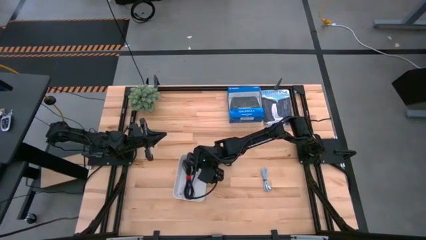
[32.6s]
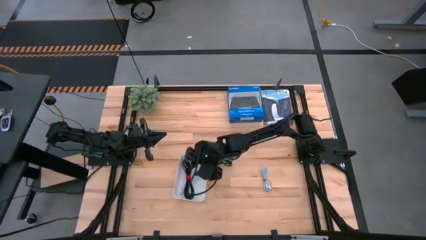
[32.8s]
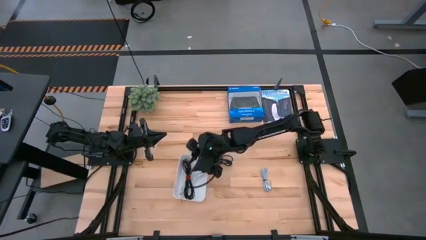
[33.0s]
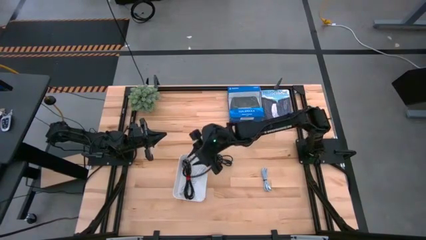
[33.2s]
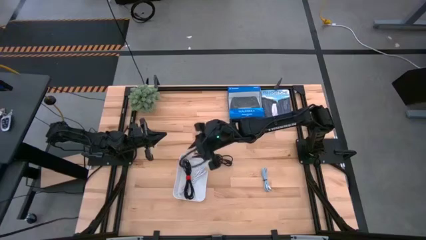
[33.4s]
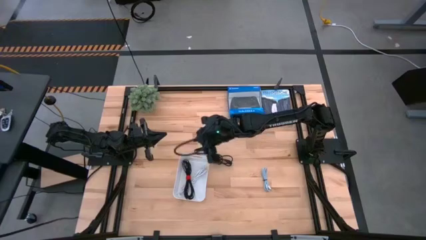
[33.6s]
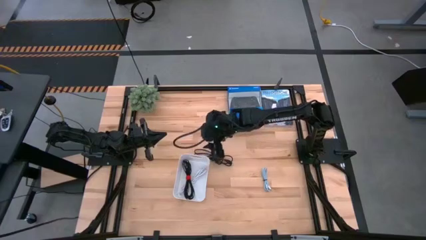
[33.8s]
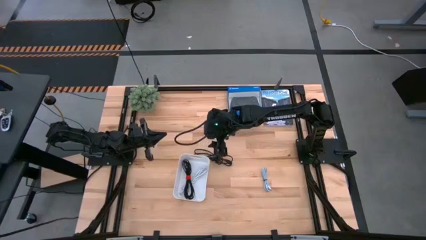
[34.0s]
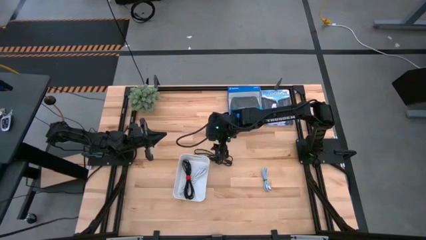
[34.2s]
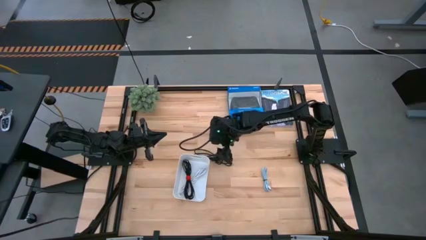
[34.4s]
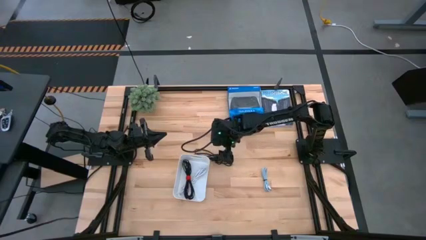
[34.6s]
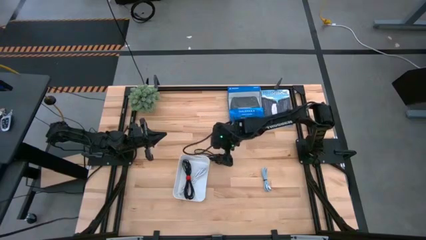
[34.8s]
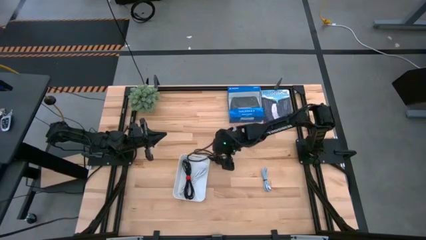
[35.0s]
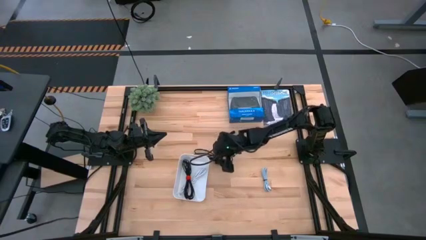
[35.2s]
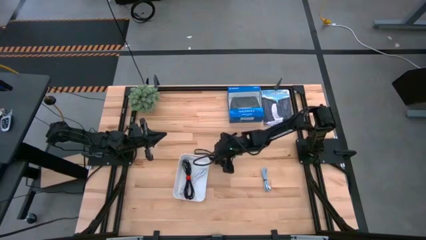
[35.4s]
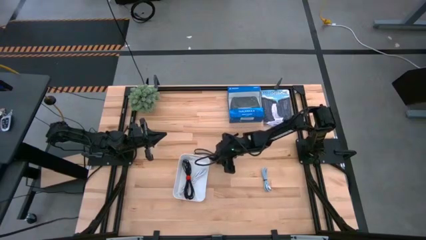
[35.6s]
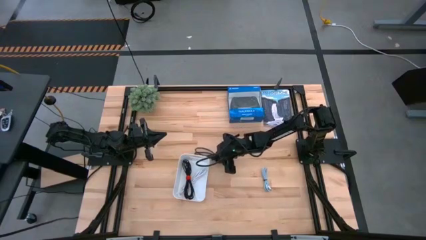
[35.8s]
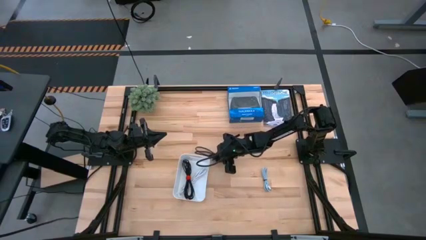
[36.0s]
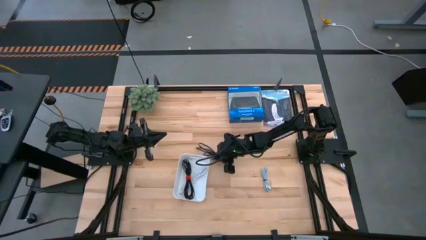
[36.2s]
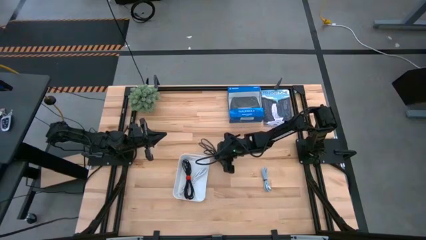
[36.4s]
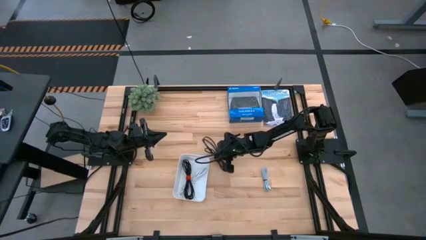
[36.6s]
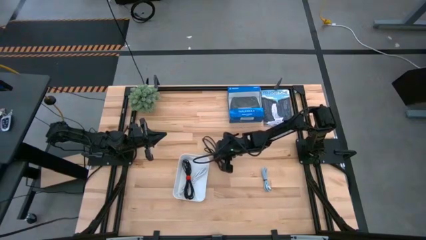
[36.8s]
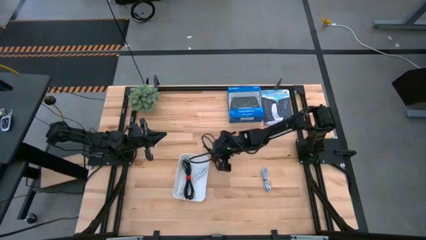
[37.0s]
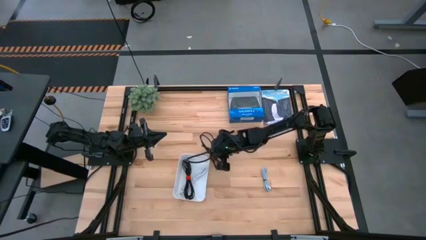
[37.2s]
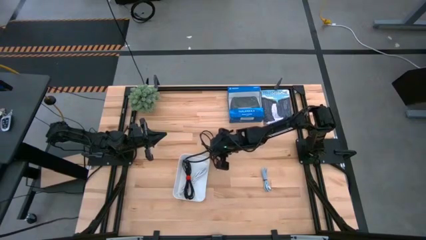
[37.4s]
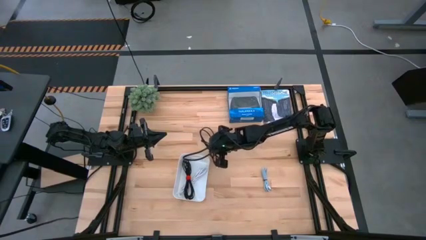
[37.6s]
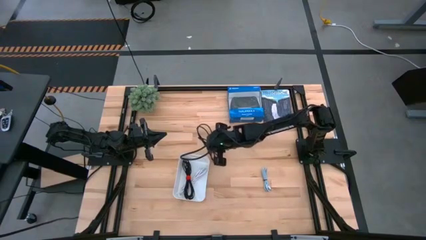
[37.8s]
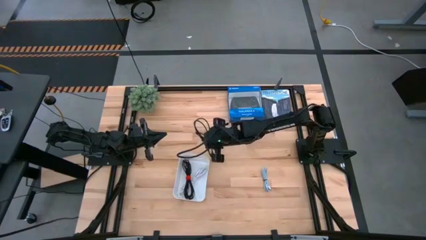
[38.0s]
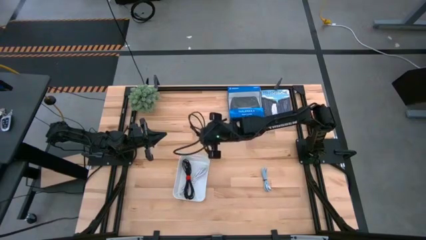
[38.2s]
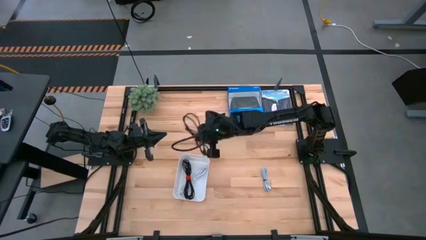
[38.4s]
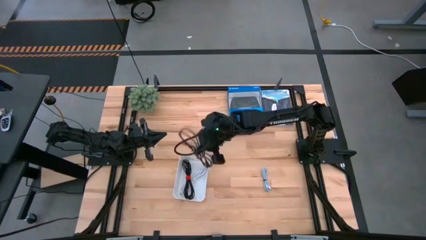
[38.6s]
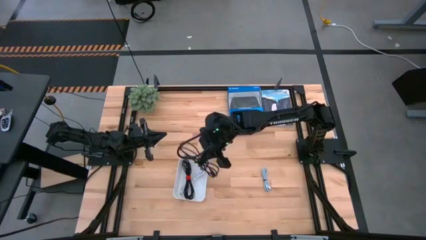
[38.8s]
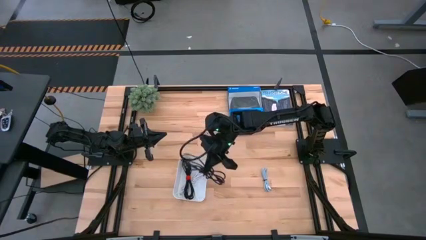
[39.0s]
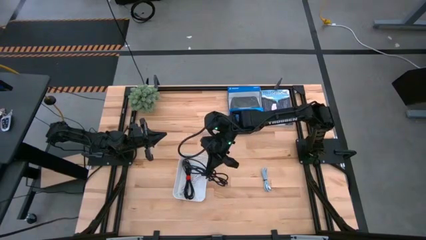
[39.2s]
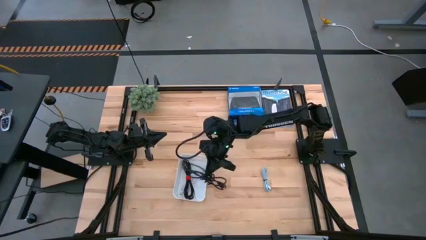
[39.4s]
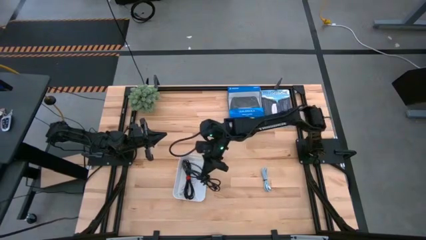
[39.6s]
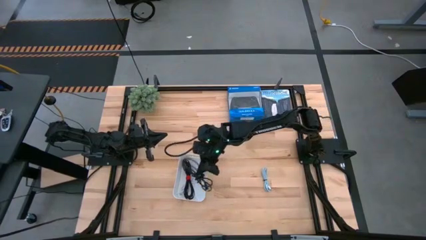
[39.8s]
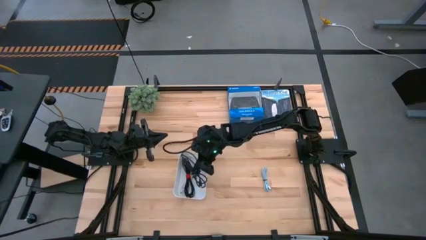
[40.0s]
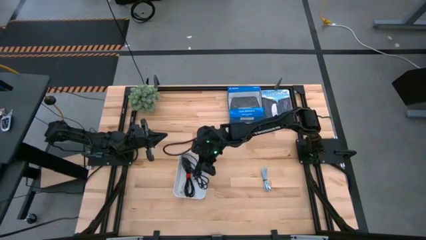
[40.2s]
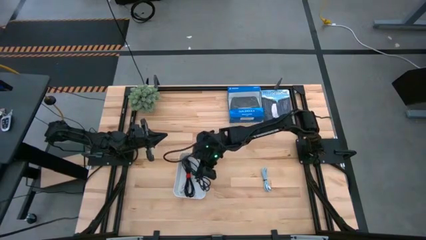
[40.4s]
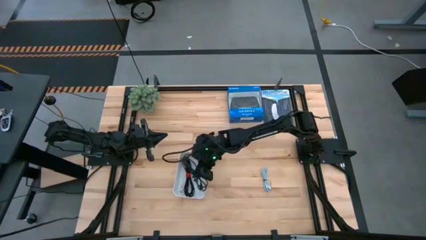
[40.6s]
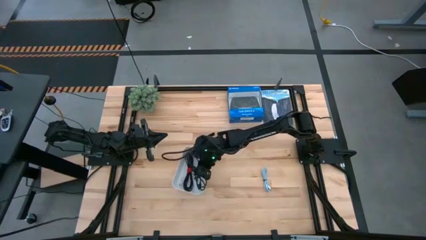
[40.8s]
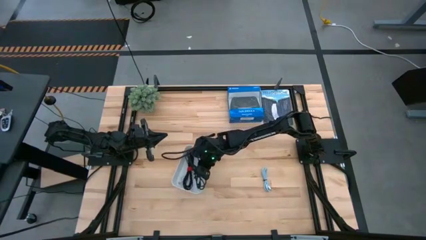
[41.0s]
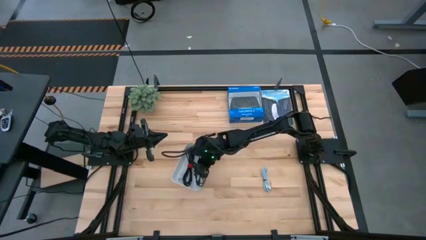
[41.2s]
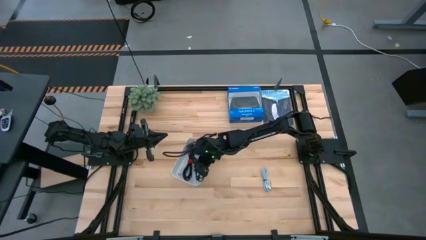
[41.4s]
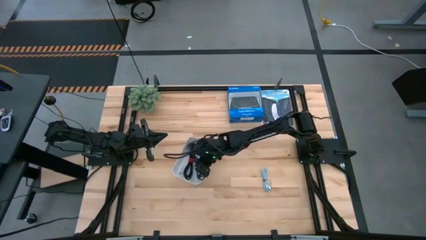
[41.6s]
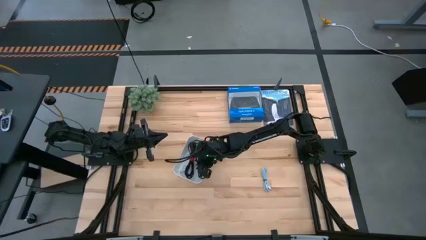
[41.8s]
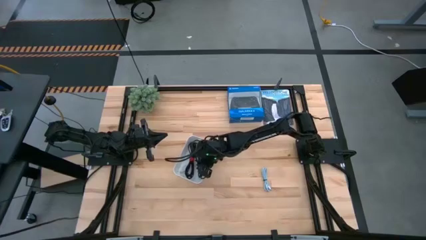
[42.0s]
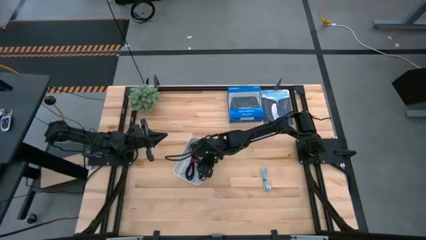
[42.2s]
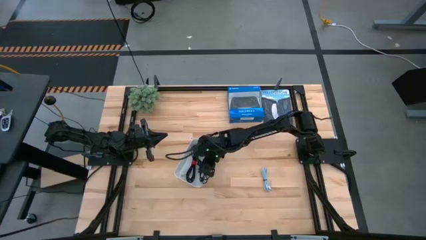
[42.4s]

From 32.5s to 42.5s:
Task: Pick and place USB-C Cables
Put the black USB cable into the white bin
